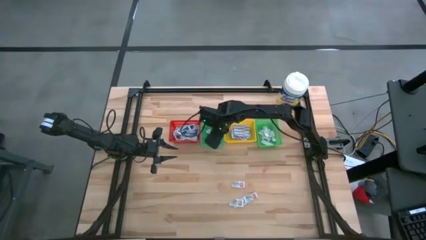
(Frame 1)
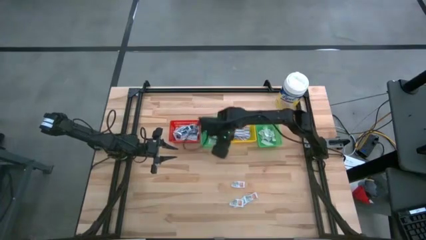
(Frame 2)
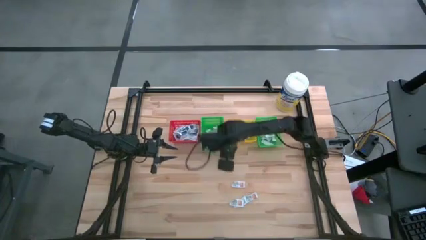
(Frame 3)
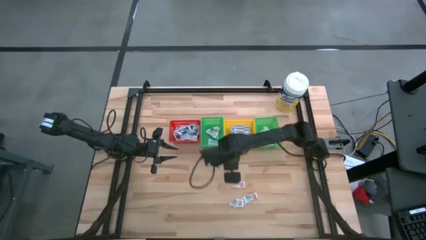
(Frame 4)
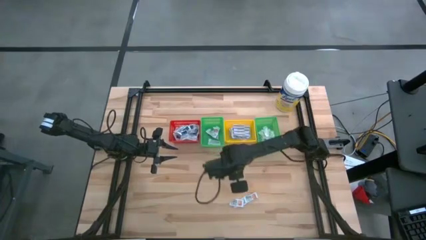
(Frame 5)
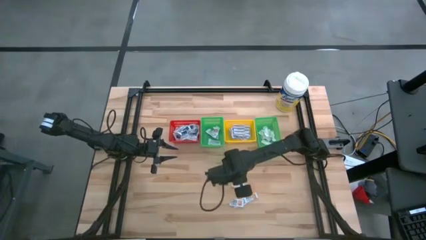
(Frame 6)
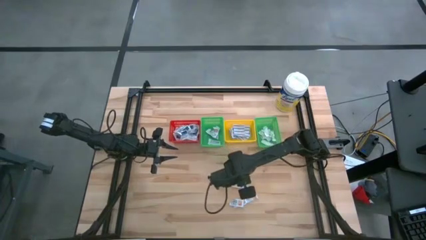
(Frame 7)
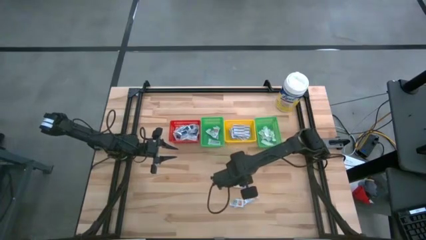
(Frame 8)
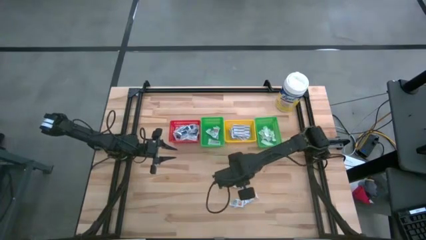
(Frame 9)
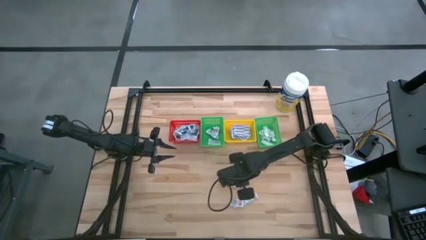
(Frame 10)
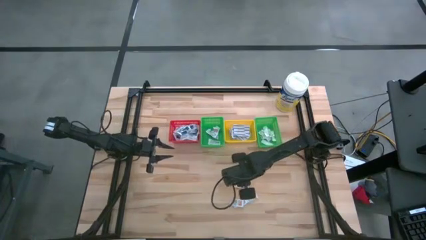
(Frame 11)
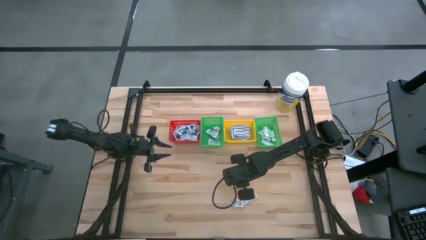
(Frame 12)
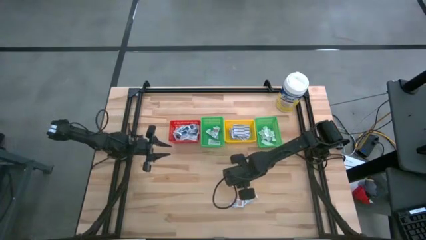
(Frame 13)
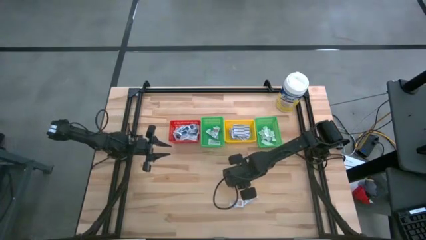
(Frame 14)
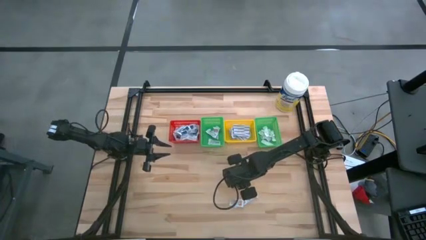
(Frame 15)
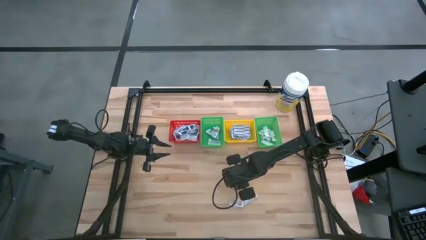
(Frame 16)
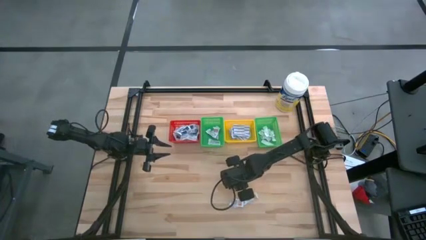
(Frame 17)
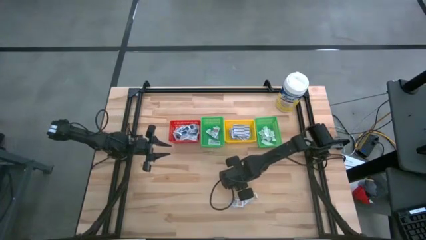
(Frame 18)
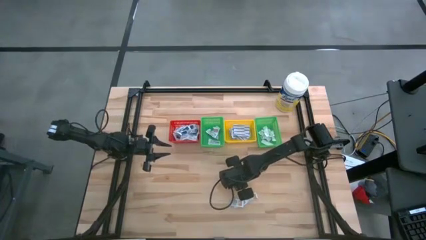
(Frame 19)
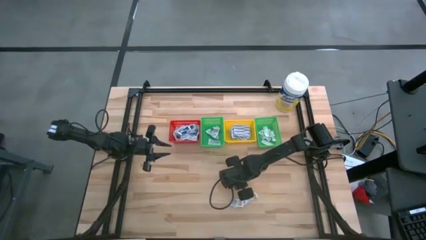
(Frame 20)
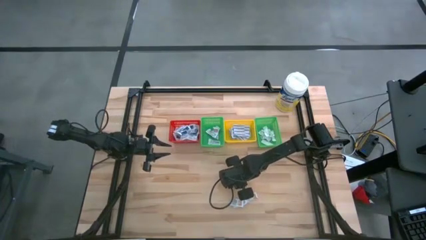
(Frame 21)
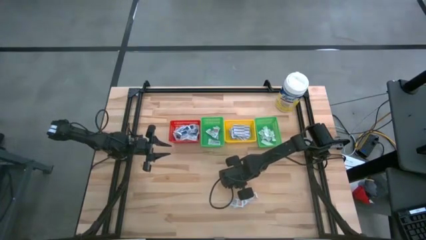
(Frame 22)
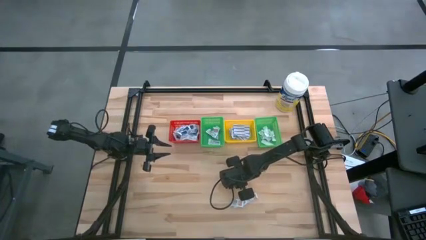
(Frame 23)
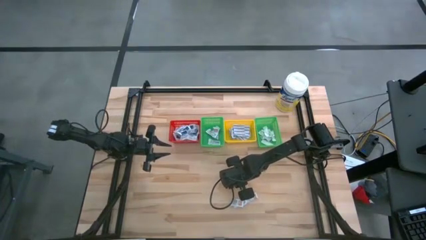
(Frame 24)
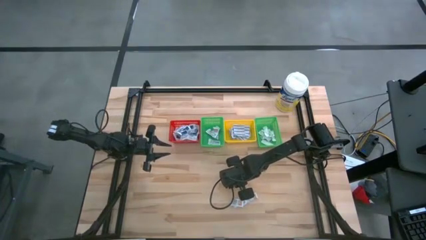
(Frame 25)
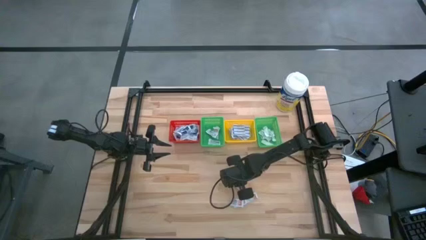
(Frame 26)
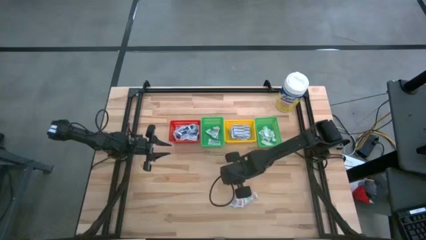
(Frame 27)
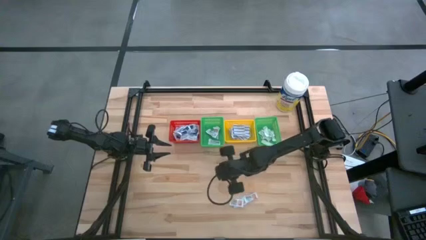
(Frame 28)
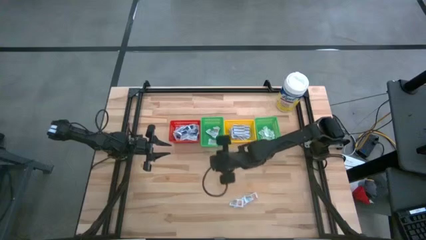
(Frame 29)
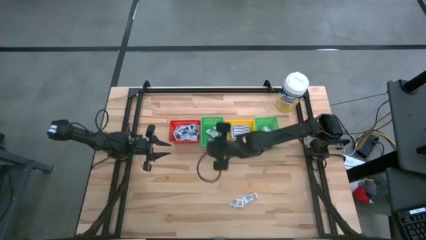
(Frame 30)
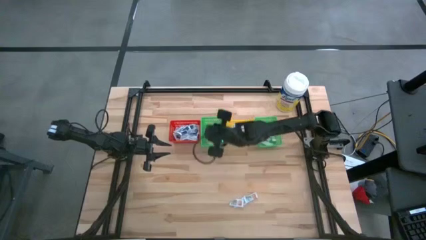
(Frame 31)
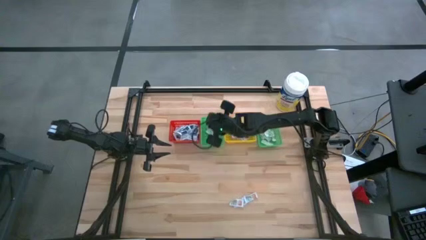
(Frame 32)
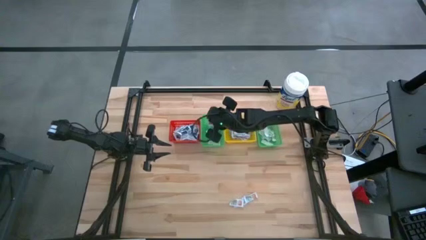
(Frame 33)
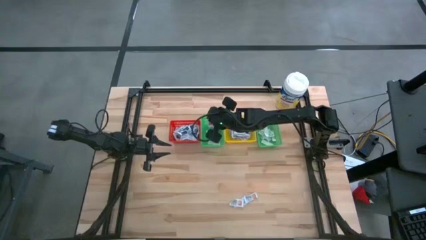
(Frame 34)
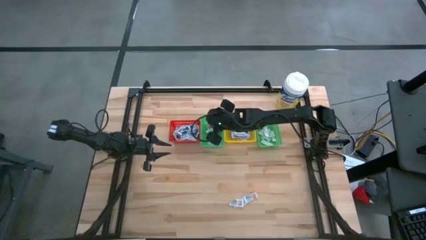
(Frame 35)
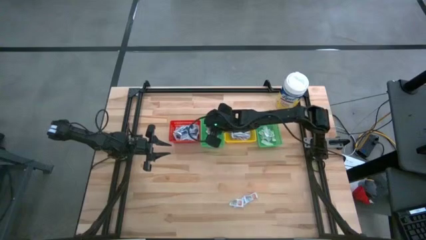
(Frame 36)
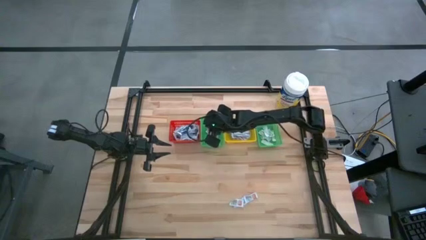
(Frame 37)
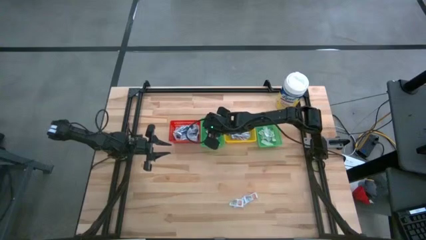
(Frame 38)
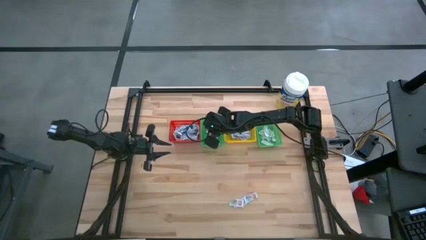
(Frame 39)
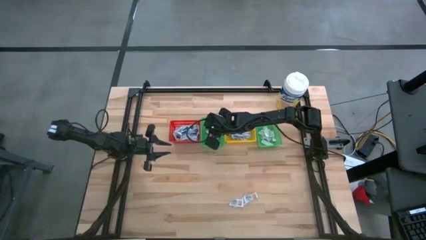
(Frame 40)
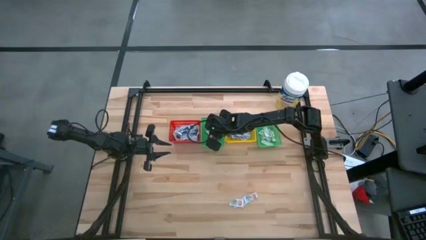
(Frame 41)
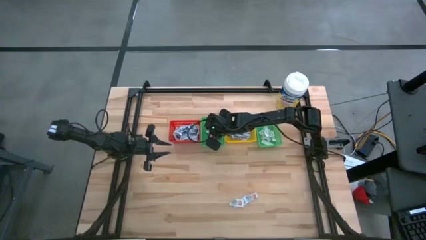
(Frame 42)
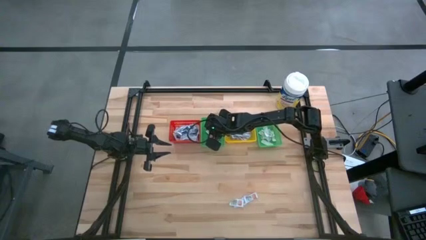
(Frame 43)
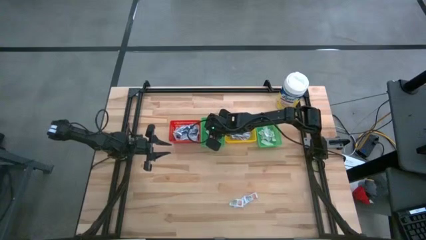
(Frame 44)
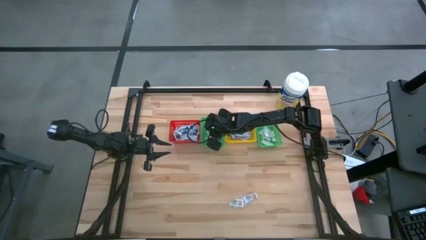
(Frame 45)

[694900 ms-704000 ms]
Task: Pick & Place First Aid Supplies
Put the ointment pack into the left green basket

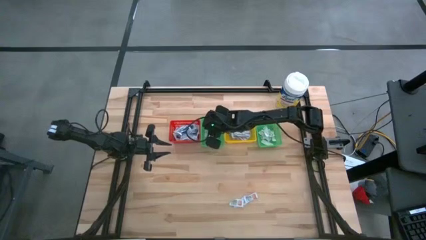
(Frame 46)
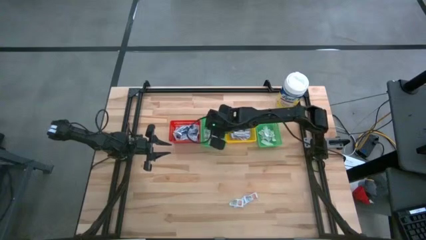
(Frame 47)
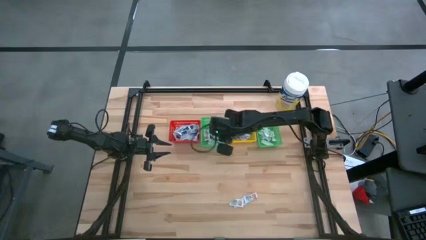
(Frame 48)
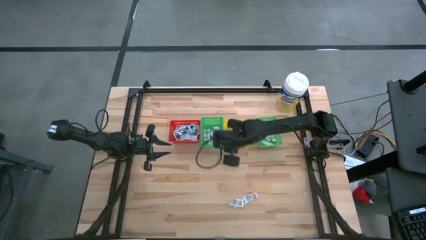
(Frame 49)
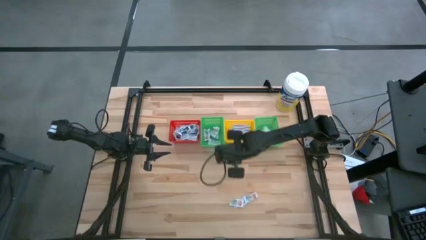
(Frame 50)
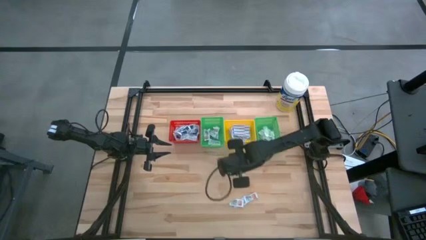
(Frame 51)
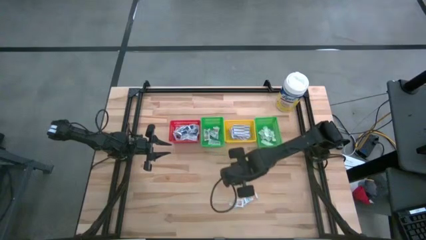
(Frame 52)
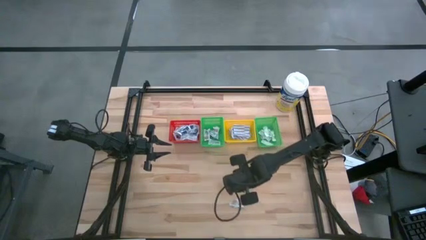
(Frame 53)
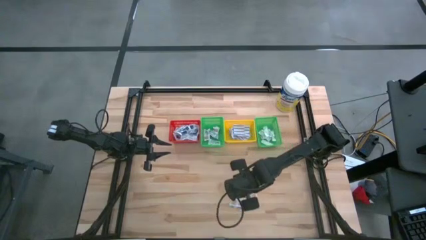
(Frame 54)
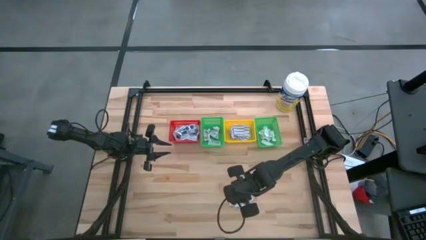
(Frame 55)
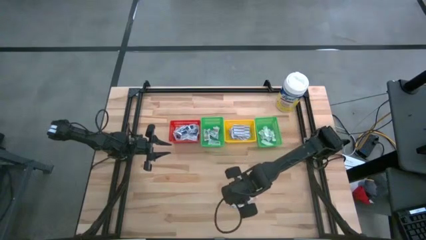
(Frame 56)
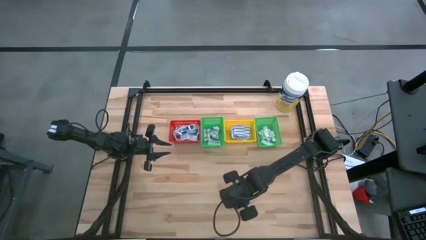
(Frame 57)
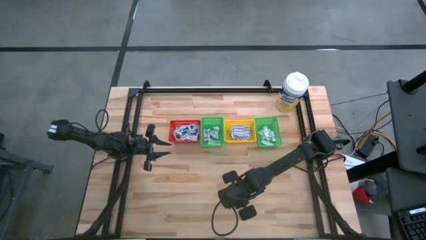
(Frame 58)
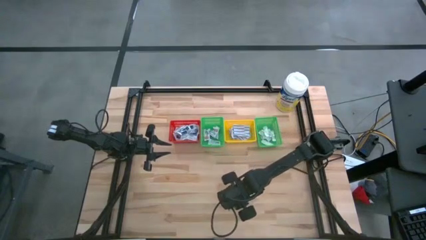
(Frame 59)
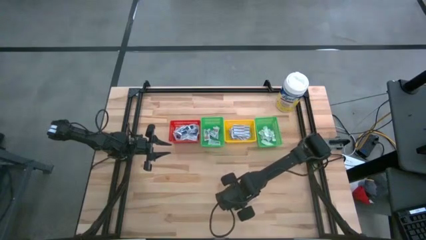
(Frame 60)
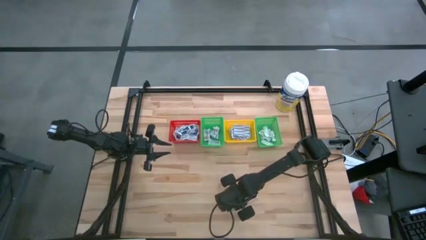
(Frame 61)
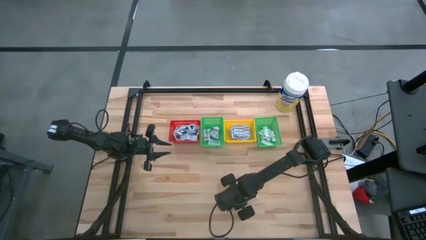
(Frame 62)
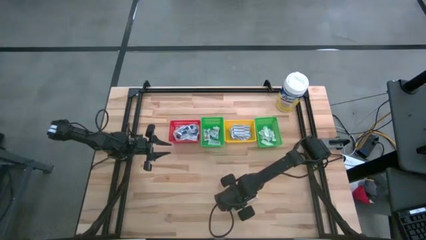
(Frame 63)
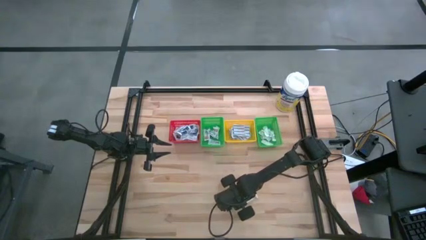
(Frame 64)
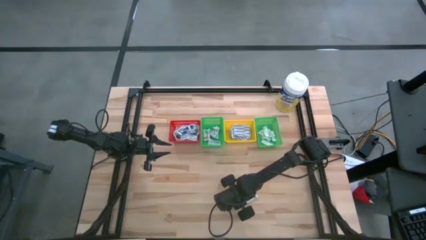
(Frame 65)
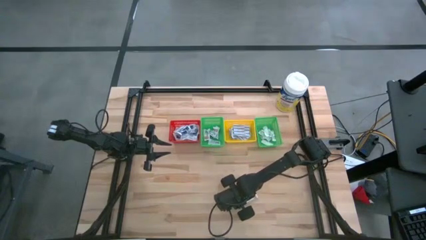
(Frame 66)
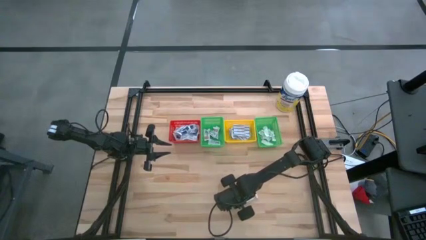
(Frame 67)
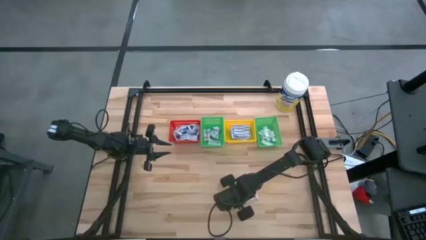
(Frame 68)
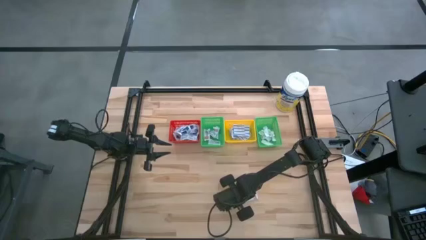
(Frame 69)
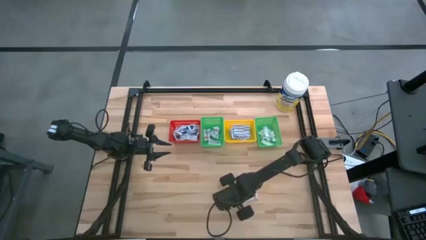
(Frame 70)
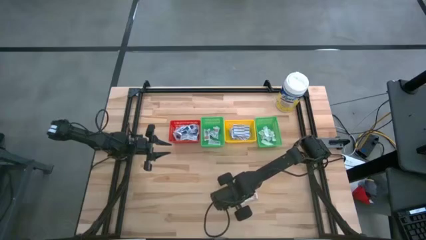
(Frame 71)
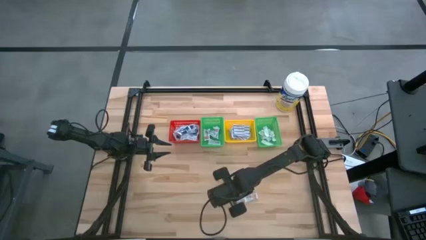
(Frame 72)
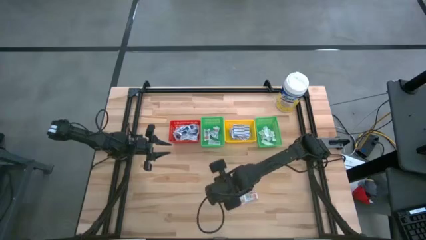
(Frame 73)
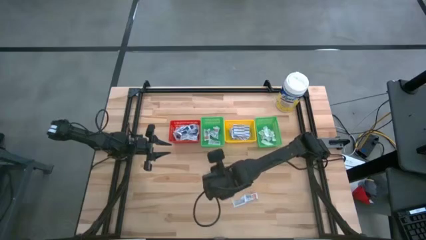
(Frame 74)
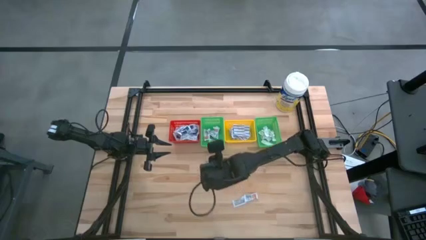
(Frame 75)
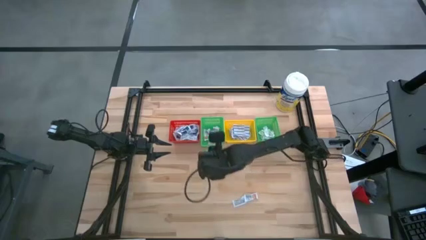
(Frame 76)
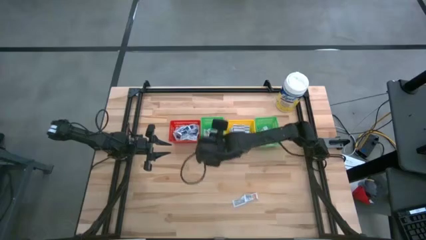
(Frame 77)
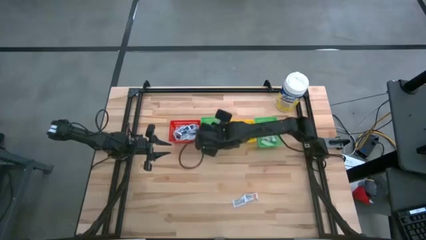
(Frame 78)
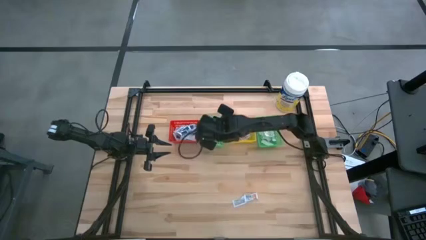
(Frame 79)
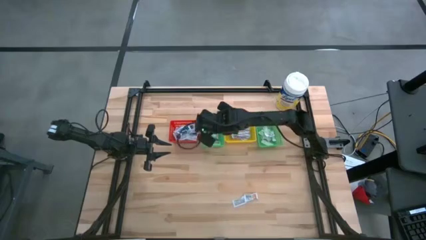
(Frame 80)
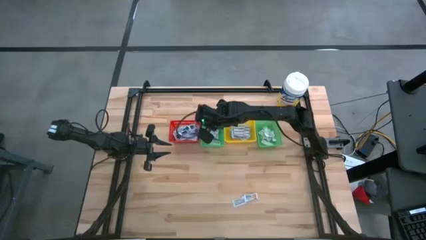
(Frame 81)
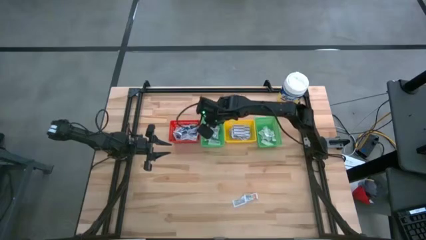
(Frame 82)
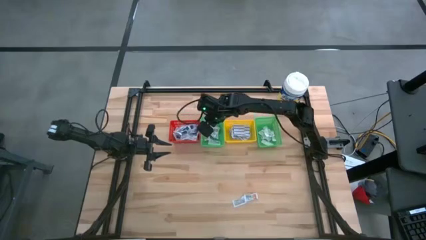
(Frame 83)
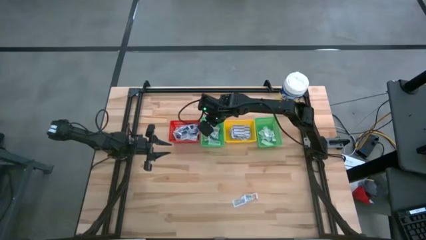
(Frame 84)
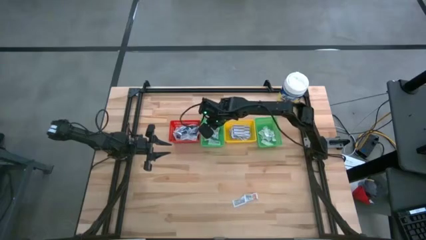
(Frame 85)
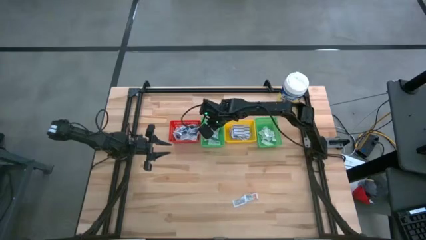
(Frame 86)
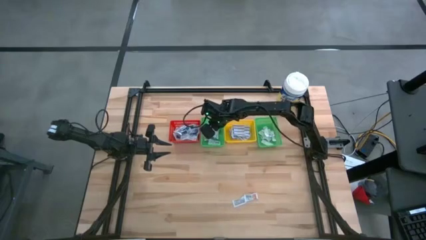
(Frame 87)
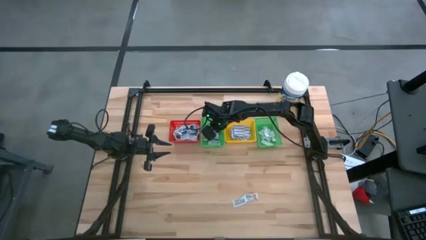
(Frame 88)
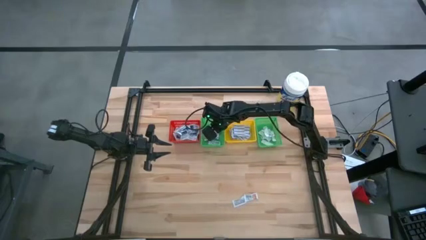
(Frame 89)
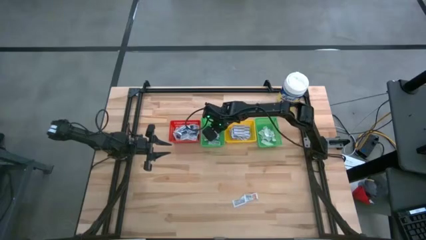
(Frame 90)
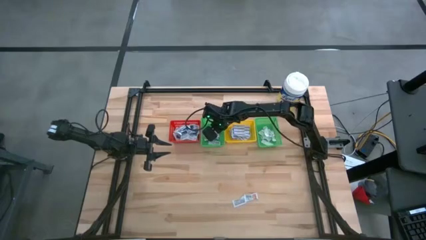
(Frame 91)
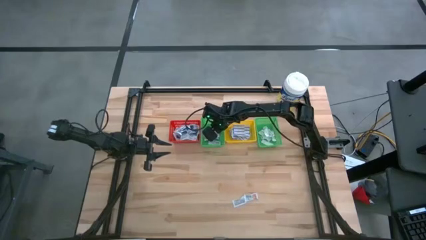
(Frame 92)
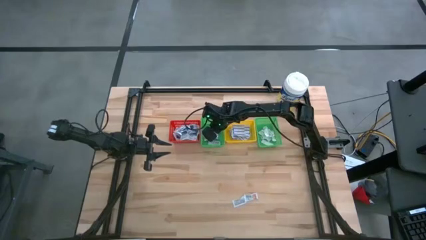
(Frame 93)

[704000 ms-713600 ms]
Put the ointment pack into the left green basket
